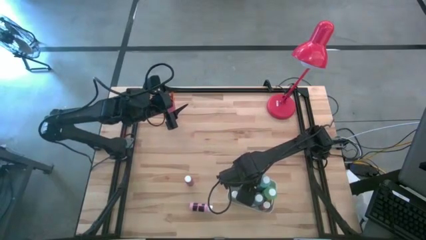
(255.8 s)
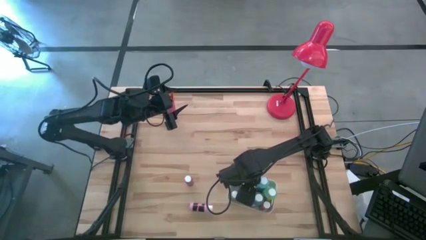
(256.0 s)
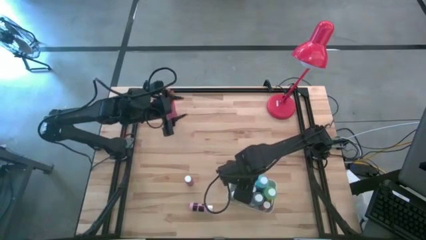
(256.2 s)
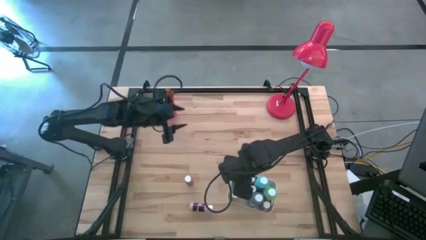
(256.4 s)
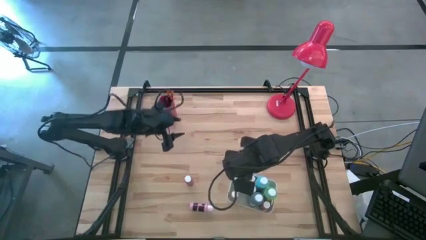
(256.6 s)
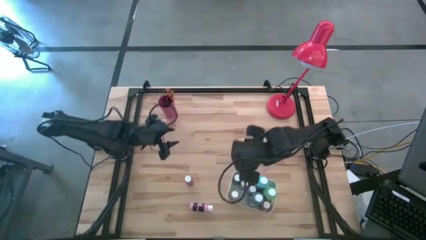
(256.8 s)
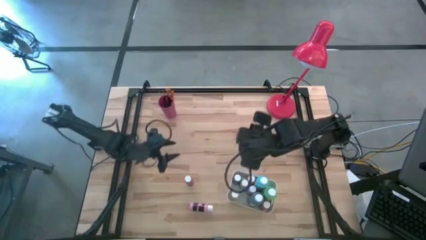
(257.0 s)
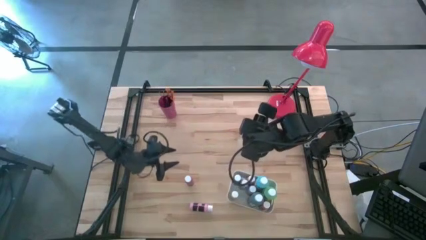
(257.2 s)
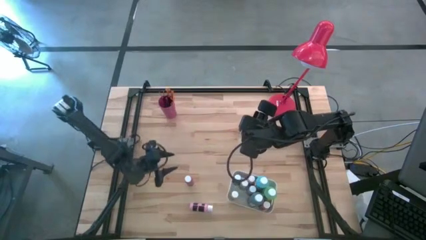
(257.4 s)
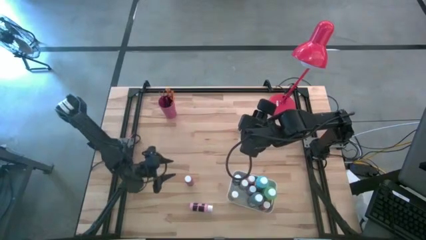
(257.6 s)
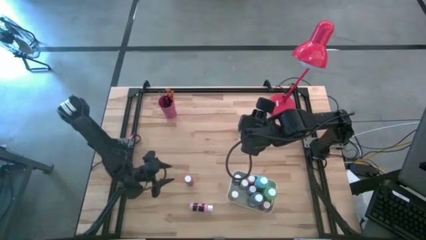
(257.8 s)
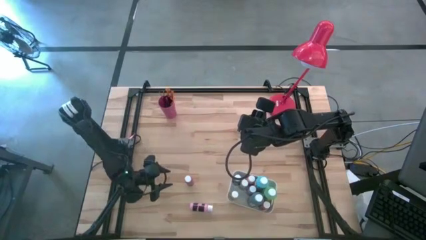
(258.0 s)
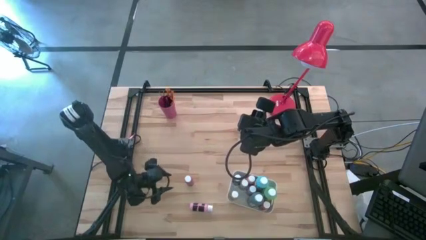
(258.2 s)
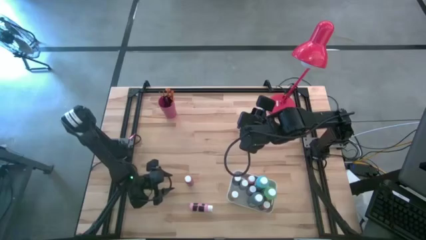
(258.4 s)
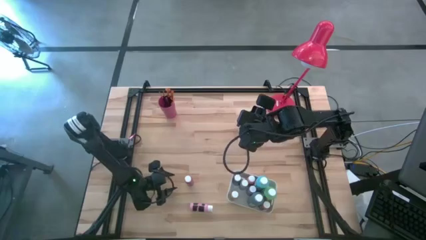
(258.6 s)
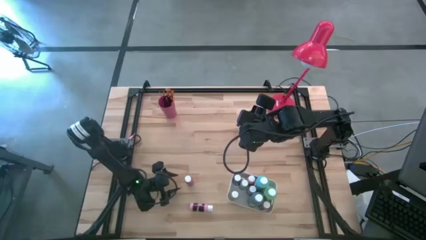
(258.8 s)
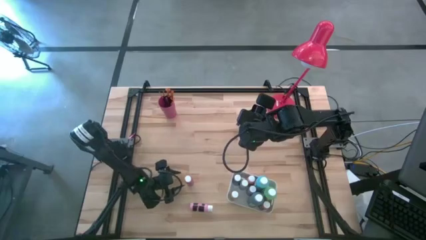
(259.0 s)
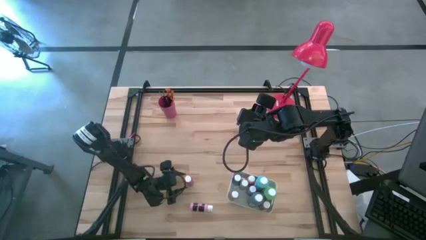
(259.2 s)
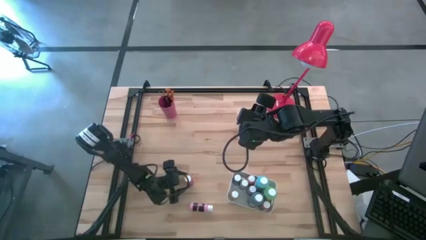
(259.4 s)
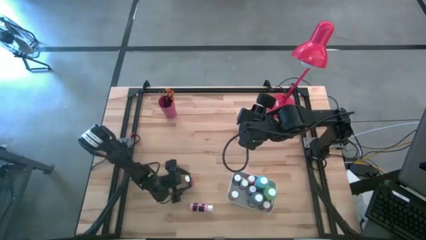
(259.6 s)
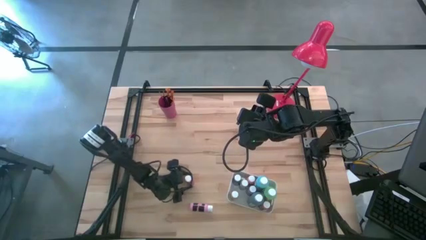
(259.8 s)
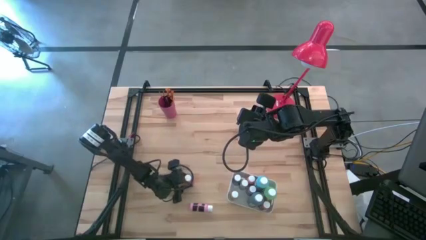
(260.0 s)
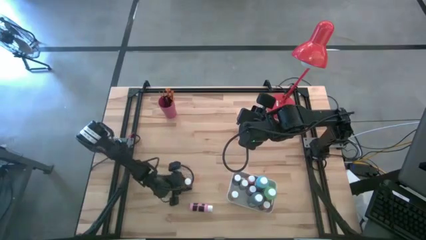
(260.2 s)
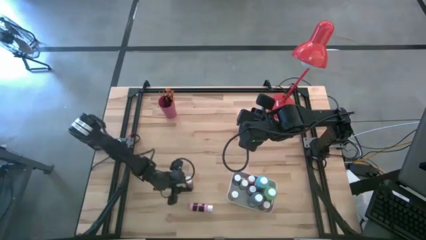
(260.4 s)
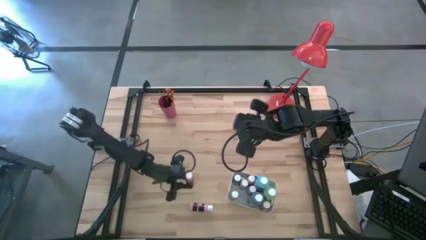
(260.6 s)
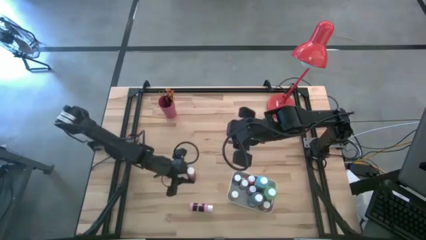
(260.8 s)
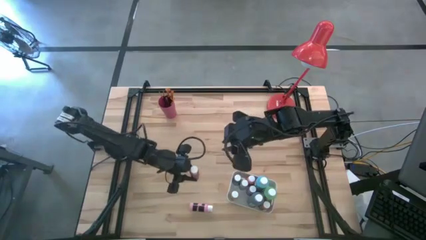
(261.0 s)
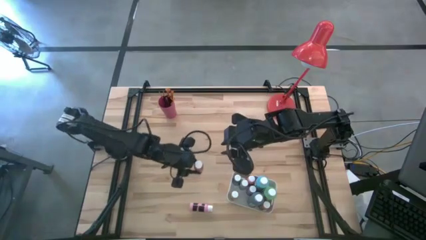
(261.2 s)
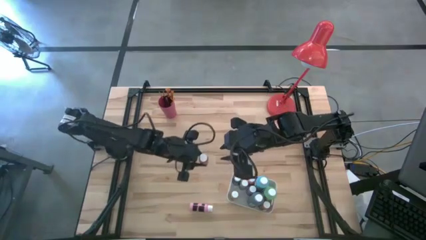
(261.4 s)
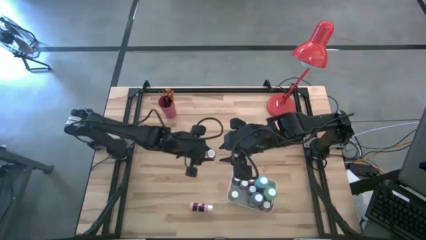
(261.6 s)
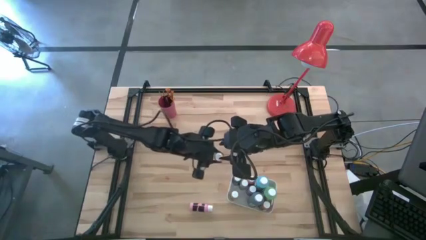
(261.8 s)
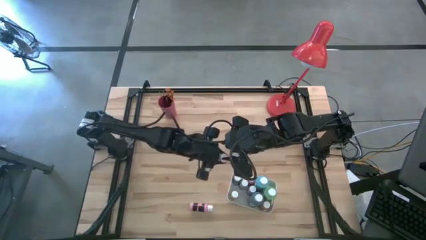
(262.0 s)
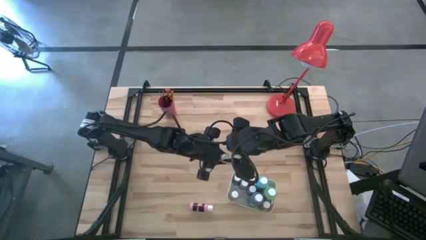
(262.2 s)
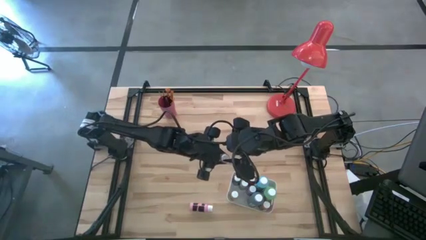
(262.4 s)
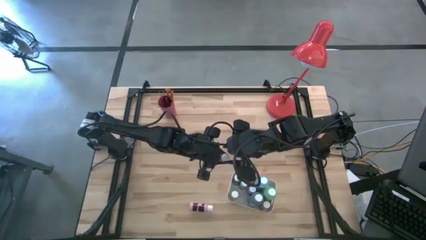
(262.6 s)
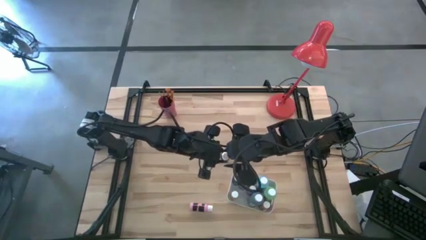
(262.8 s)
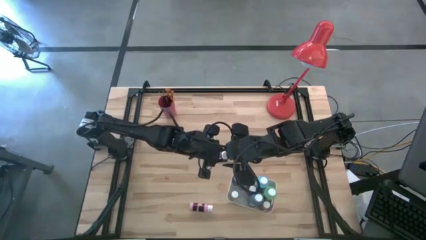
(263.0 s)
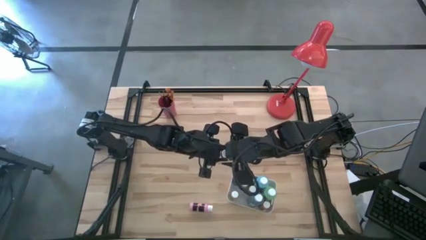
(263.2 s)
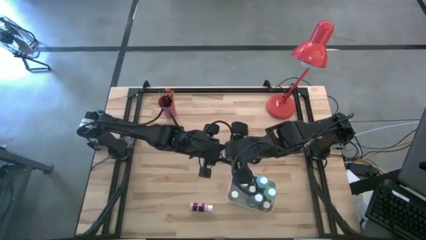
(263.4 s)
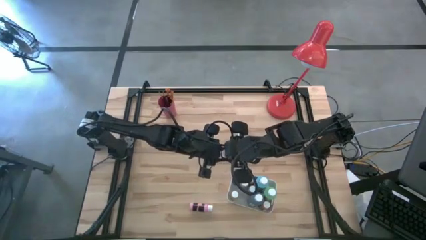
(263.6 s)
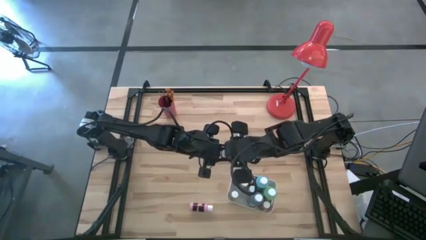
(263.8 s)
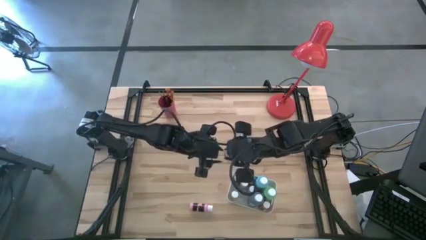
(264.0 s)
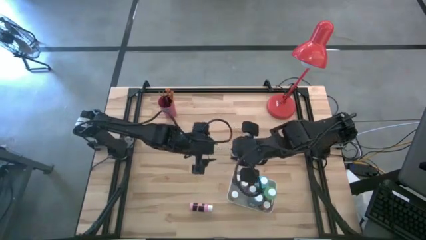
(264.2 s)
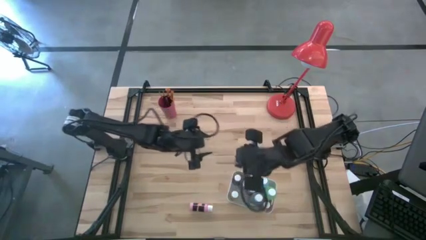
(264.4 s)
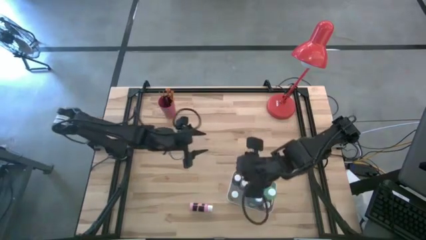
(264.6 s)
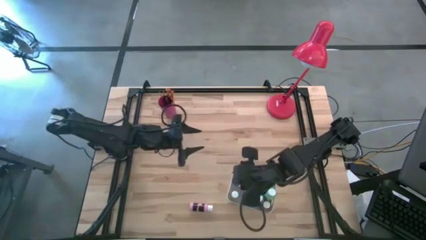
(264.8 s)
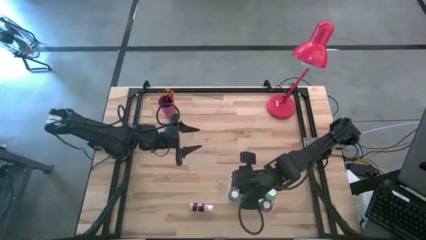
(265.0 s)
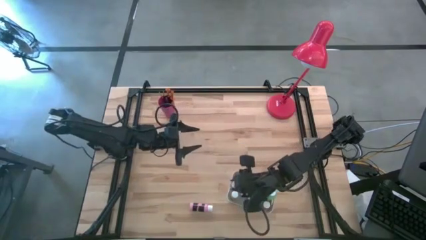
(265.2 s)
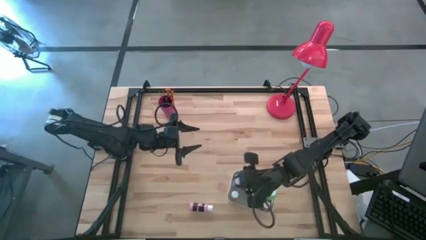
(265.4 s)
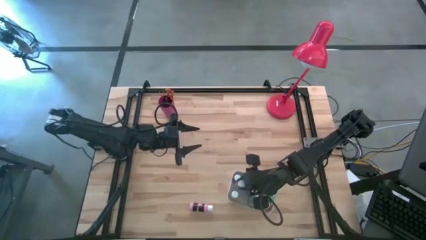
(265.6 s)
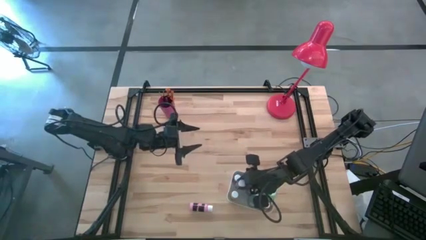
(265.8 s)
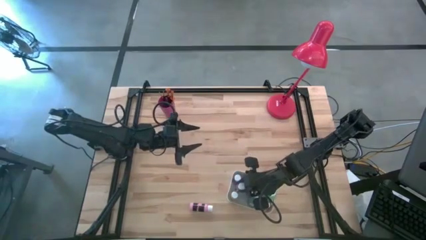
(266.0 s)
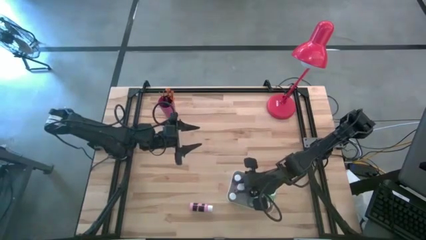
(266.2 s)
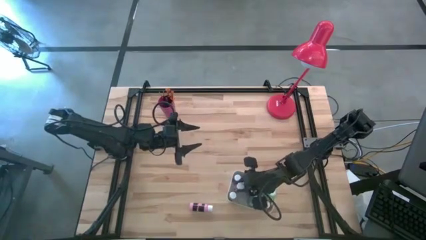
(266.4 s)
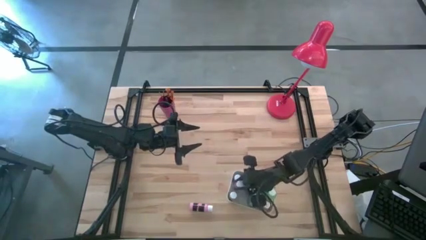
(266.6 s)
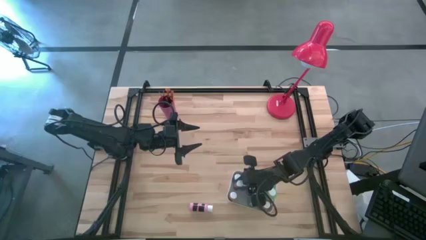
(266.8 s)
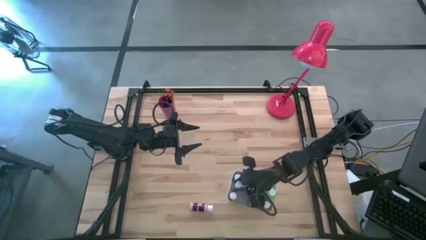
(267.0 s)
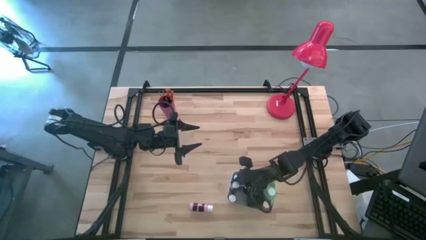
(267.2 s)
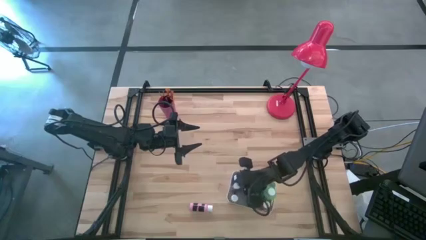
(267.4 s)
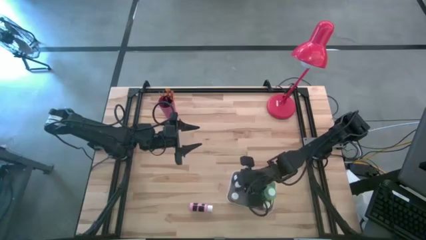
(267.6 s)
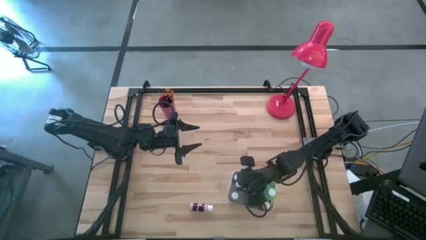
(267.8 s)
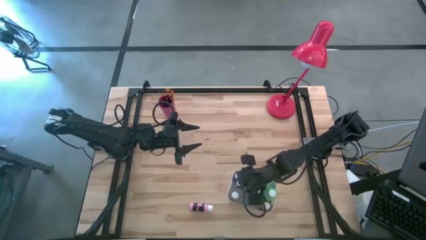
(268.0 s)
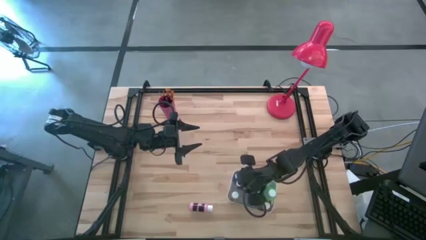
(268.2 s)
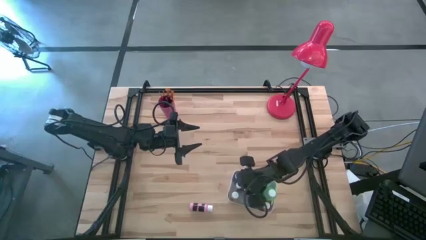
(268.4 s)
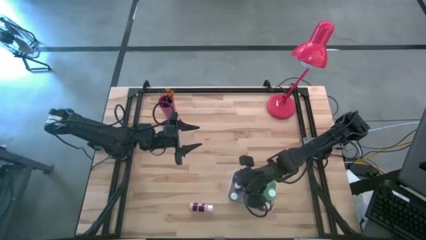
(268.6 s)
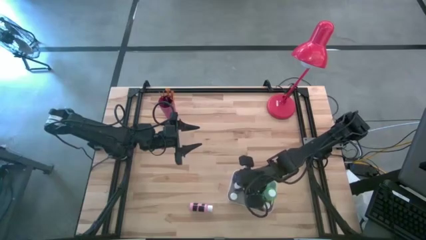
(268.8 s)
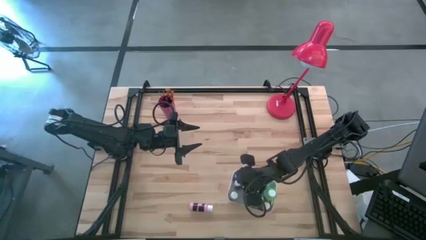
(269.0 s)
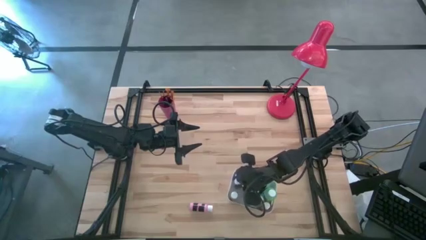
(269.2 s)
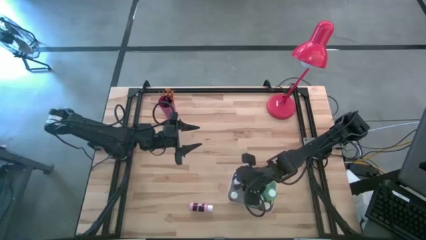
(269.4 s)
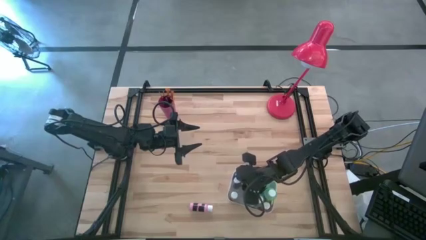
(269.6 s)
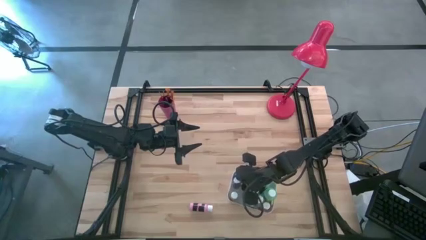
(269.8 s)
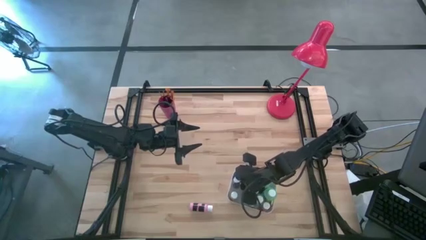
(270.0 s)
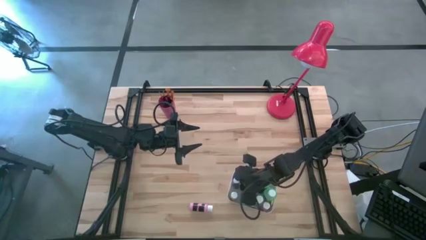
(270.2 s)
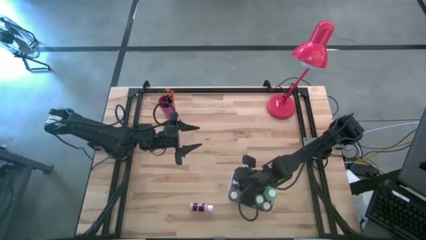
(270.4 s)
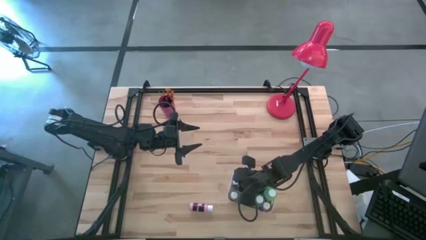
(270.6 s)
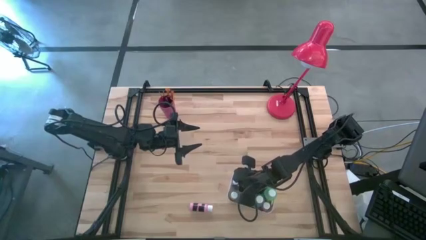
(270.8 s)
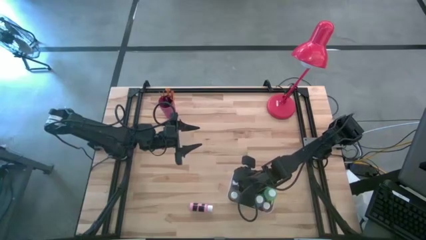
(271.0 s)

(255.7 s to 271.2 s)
Task: Pick & Place Paint Supplies
Put the pink paint bottle into the white bin

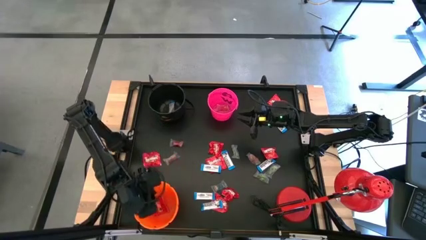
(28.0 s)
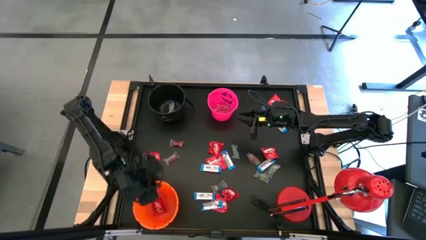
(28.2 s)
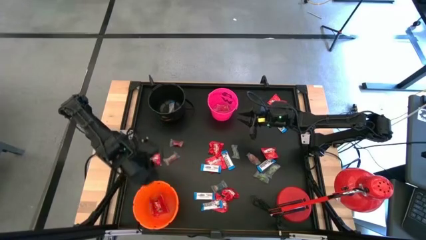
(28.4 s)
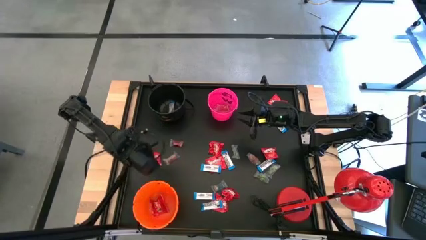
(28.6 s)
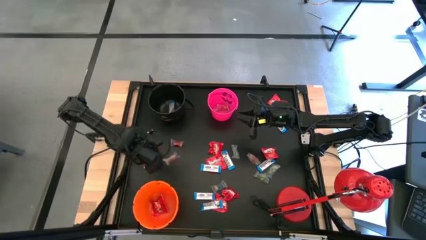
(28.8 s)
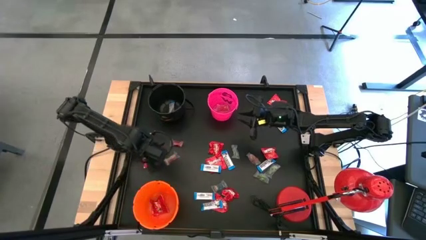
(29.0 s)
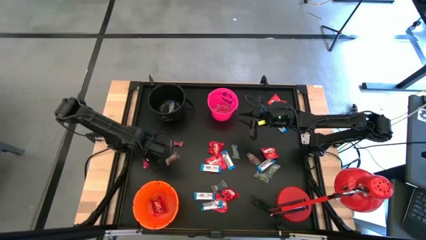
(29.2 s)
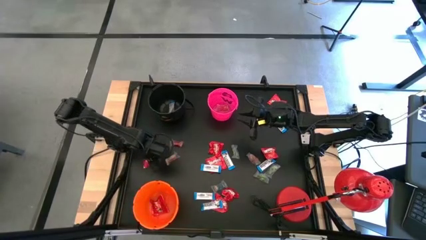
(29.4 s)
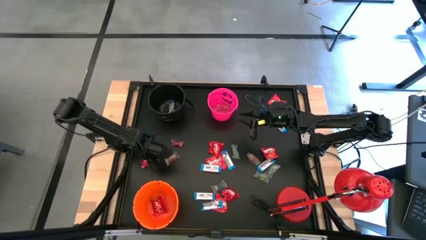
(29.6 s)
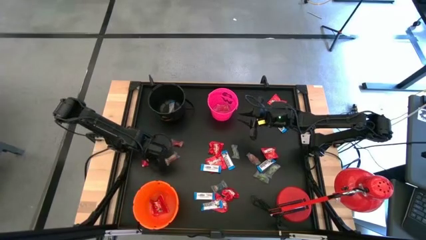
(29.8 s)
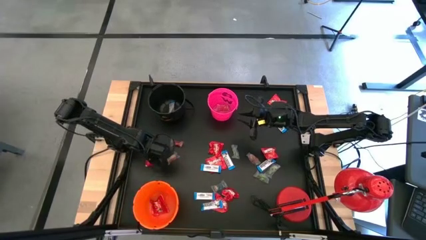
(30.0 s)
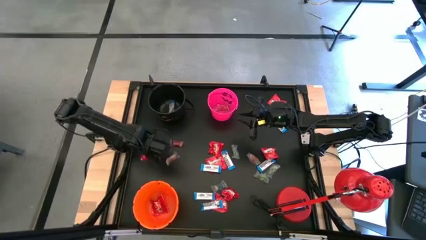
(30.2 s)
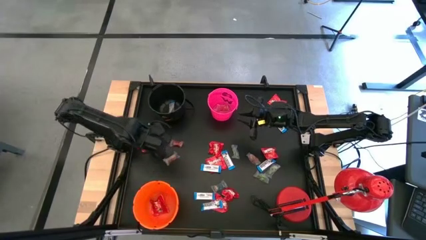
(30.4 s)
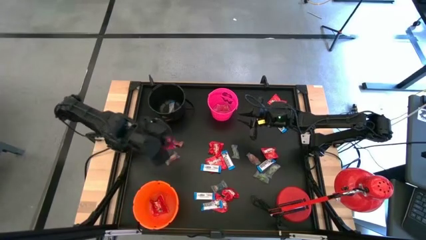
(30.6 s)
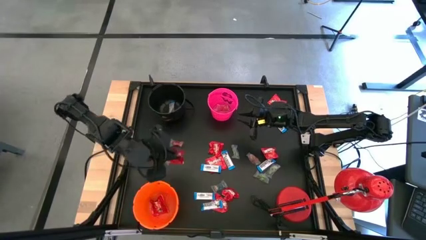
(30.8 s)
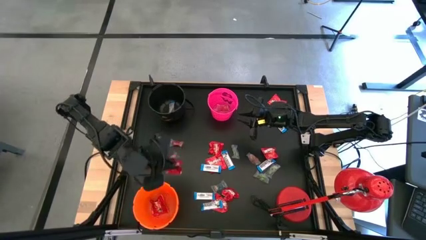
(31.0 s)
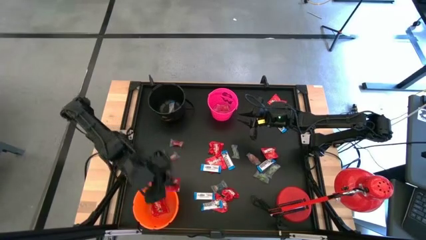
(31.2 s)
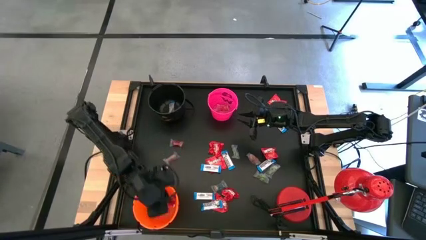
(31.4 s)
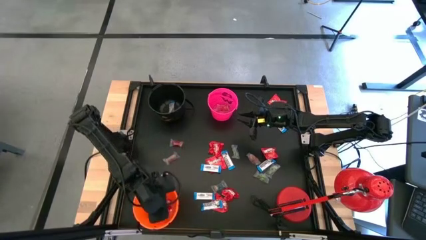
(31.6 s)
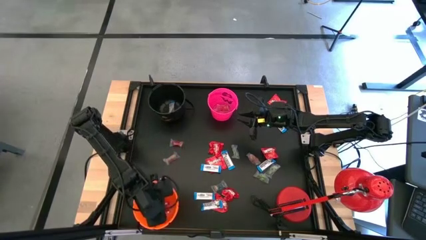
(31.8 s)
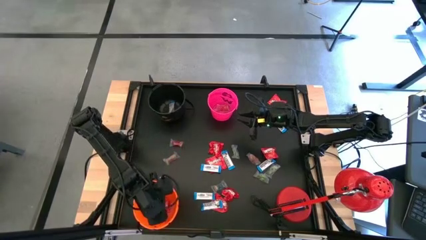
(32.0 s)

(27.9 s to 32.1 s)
Task: Organize candy in baskets
Put the red candy into the orange bucket
